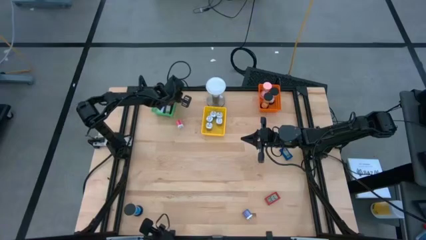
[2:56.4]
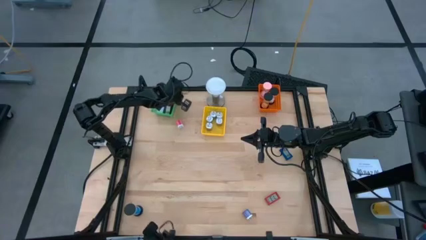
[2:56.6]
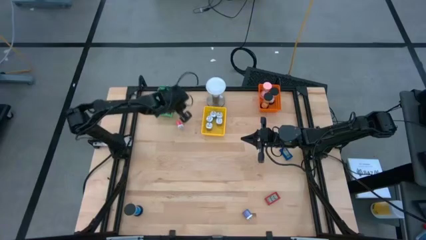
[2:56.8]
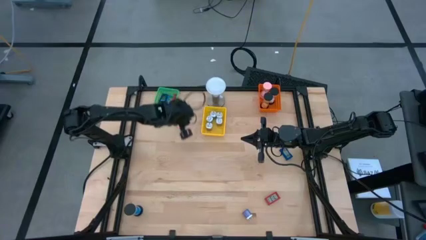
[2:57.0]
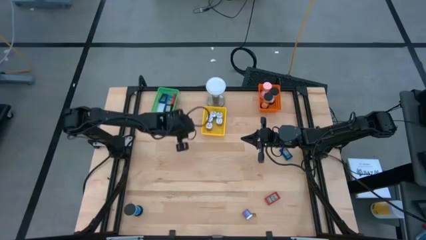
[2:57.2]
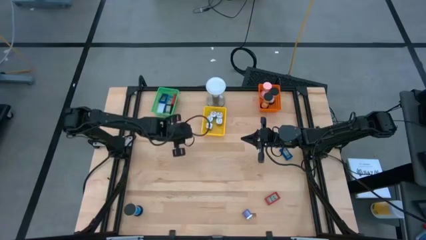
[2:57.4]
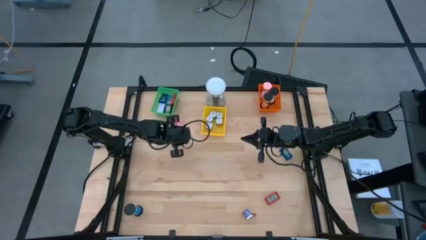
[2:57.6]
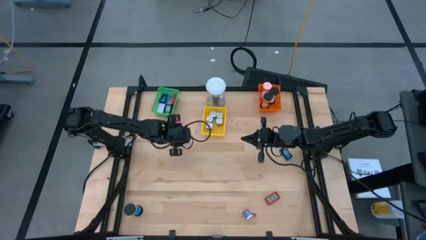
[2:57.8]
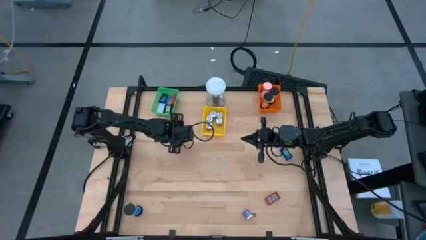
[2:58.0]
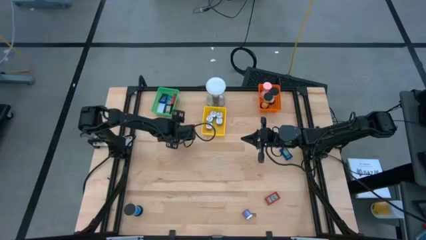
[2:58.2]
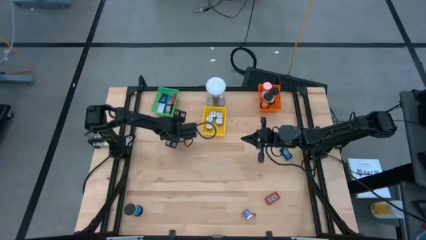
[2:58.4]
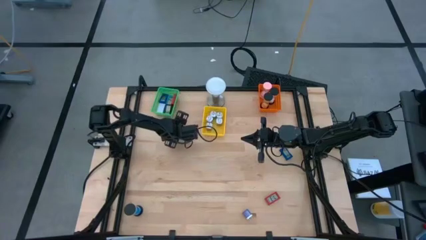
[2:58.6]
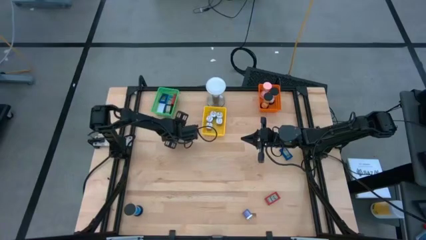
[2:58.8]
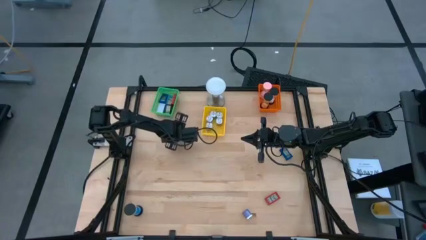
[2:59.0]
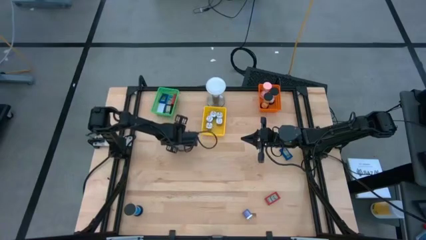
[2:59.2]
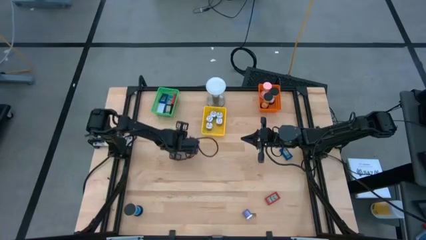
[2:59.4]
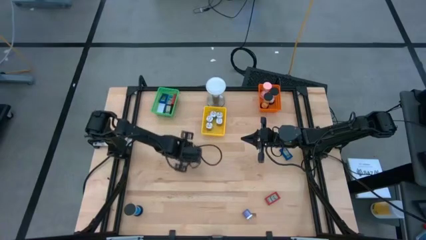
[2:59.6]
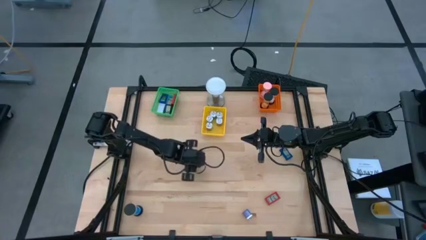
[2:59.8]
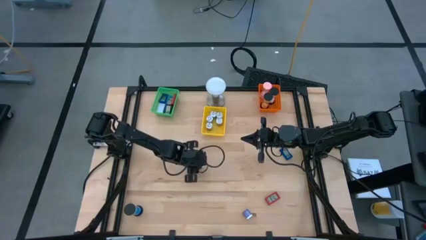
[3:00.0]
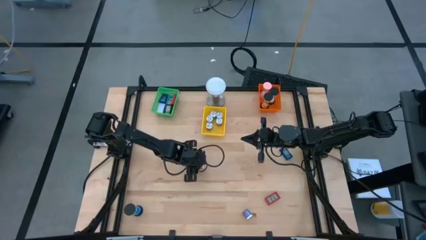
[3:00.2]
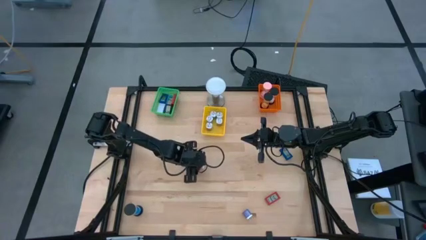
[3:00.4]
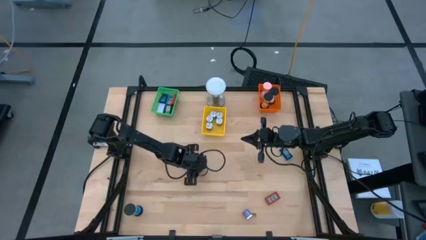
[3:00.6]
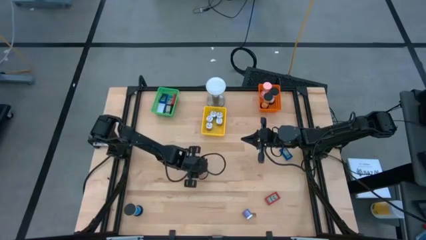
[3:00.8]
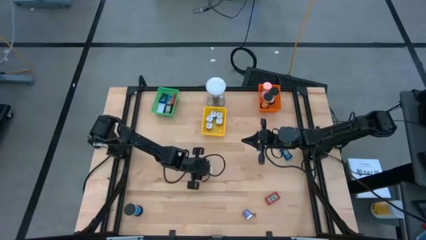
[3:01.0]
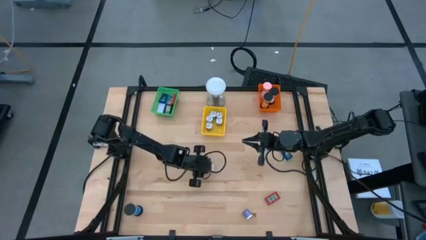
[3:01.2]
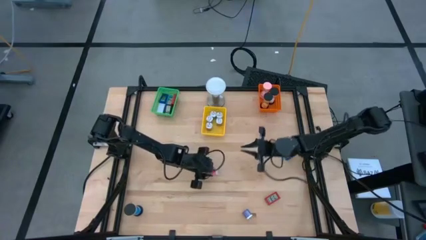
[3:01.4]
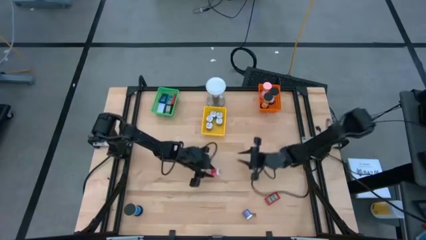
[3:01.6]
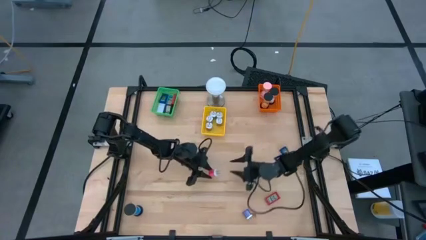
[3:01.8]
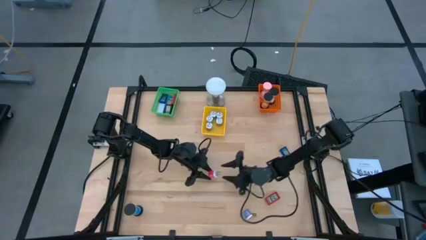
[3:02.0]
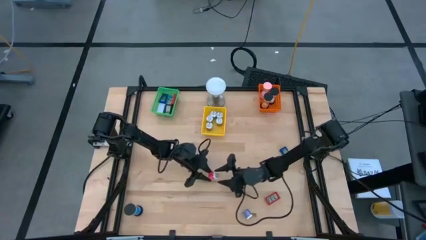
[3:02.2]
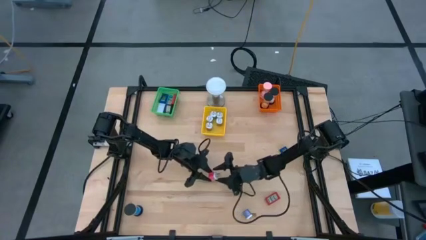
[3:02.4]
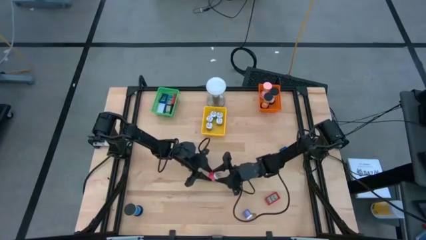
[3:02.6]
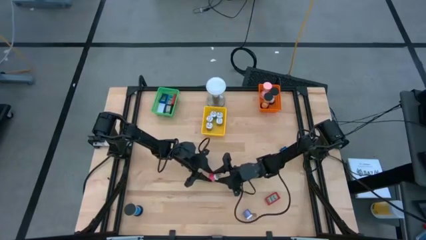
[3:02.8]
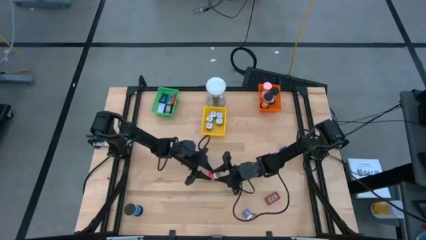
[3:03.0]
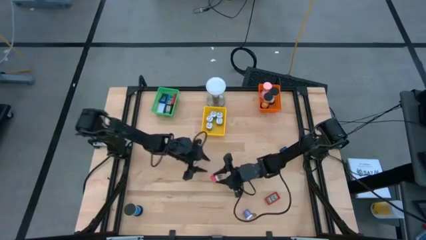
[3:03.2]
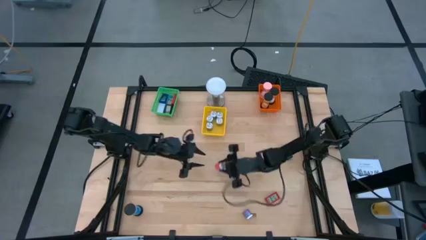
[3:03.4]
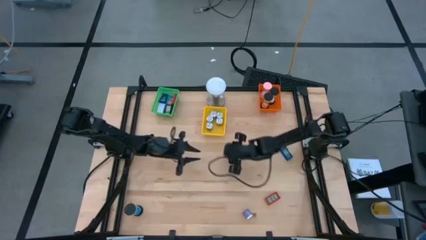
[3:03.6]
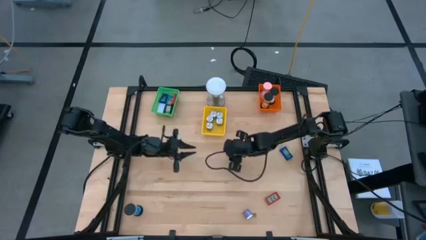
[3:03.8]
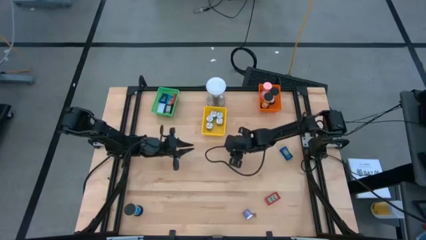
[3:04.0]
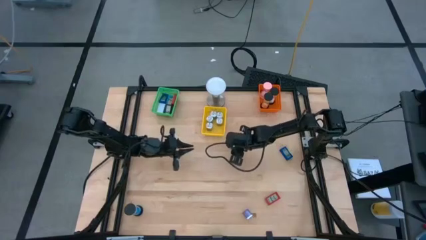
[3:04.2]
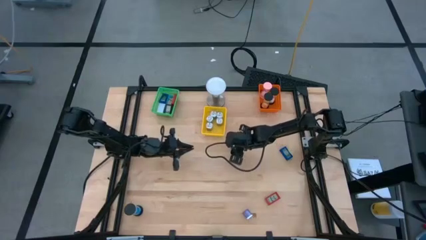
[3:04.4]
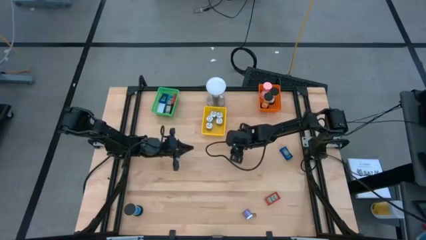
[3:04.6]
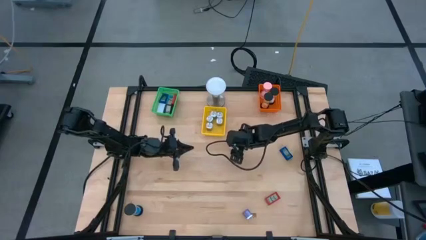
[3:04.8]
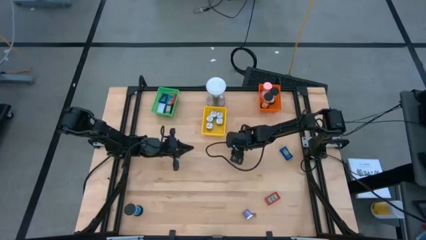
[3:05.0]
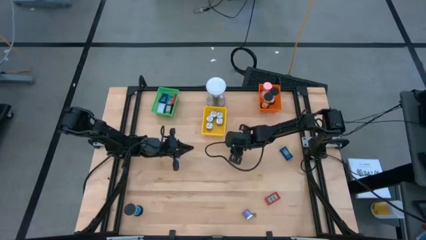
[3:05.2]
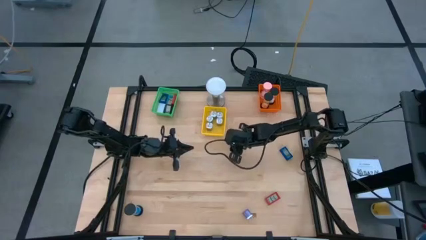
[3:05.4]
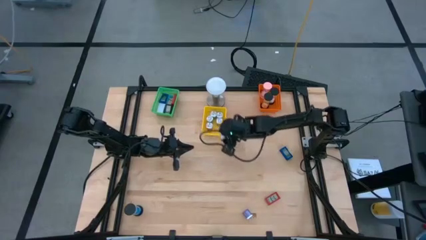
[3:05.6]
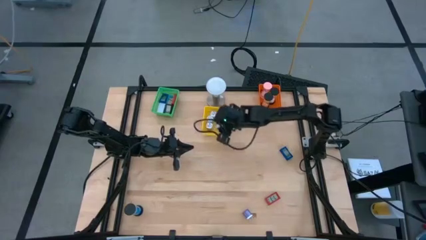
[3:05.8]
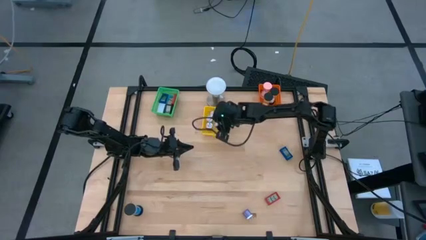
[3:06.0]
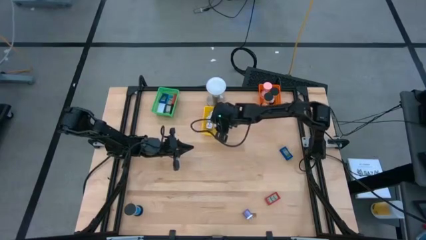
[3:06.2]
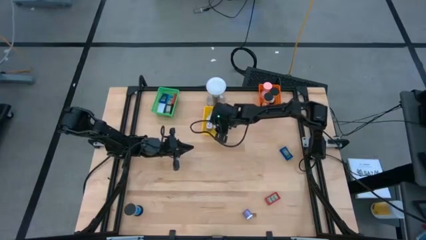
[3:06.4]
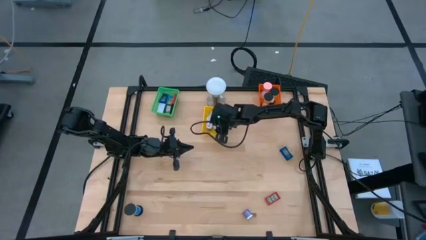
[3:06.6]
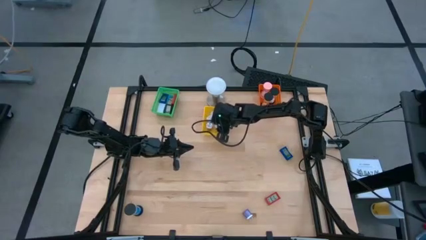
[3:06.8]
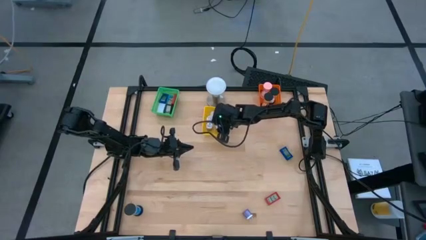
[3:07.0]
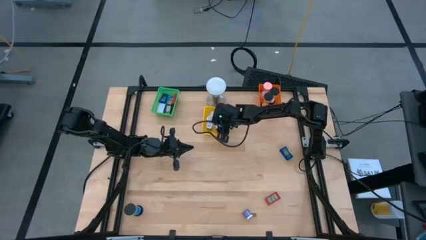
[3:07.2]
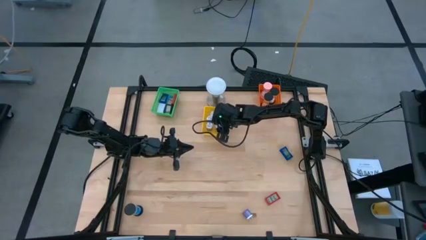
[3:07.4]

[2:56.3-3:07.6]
Task: Pick & Place Office items
Put the pink charger adapter into the yellow bin

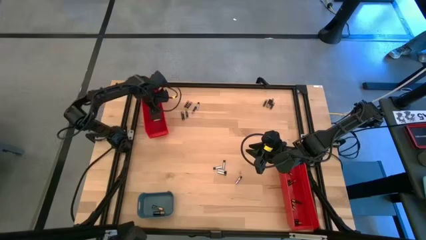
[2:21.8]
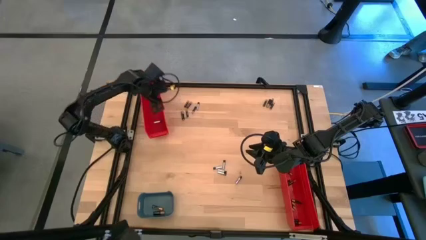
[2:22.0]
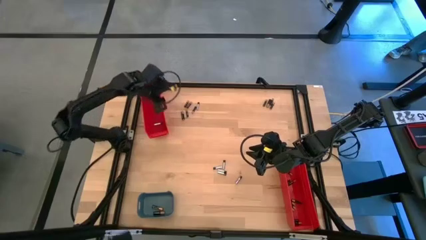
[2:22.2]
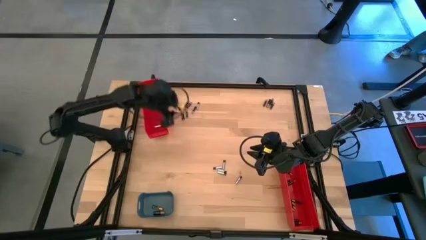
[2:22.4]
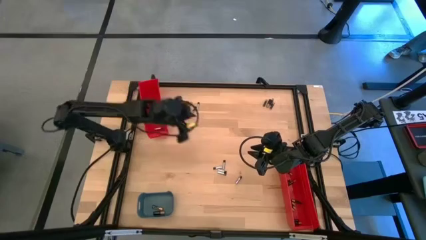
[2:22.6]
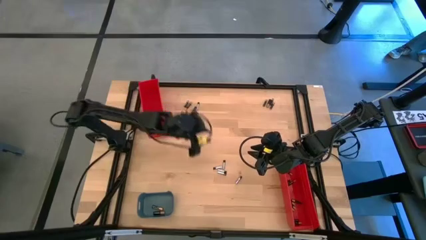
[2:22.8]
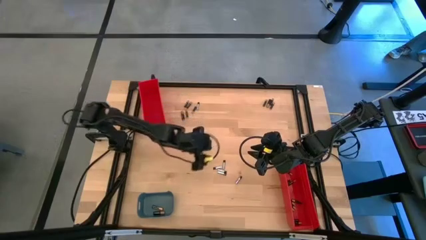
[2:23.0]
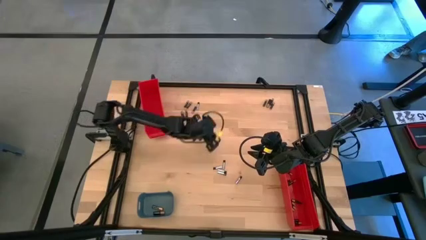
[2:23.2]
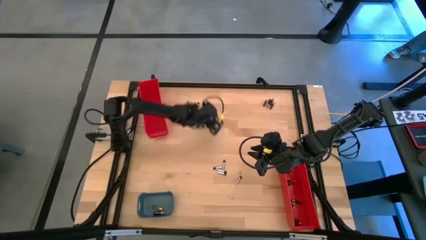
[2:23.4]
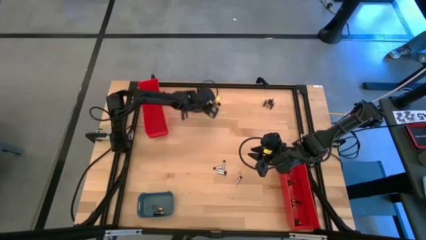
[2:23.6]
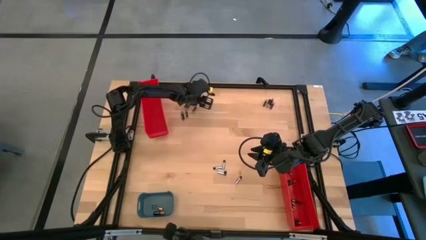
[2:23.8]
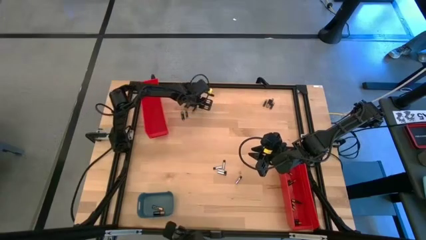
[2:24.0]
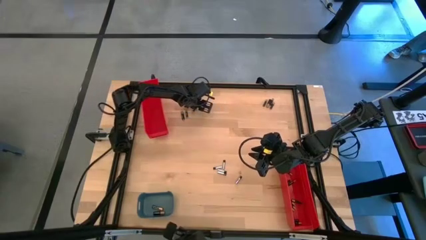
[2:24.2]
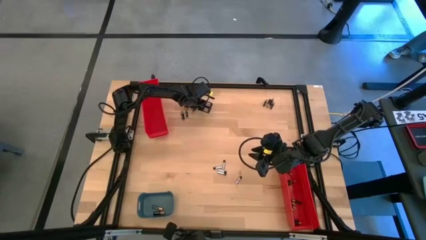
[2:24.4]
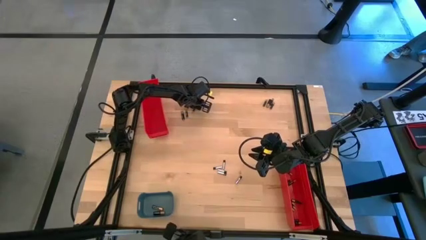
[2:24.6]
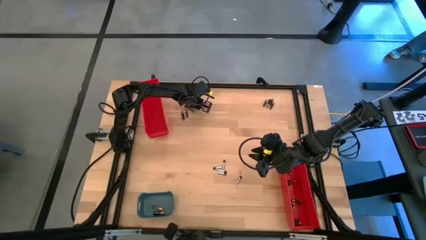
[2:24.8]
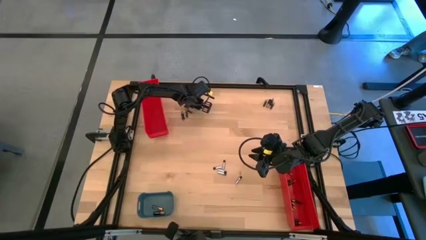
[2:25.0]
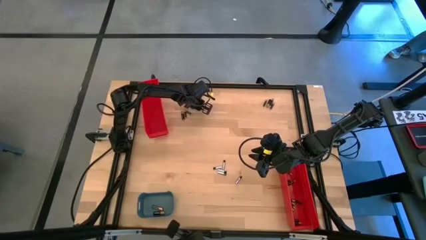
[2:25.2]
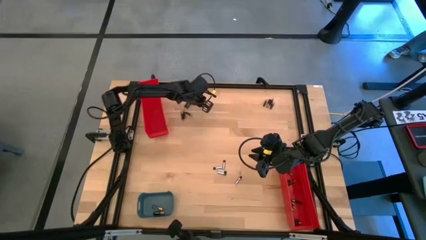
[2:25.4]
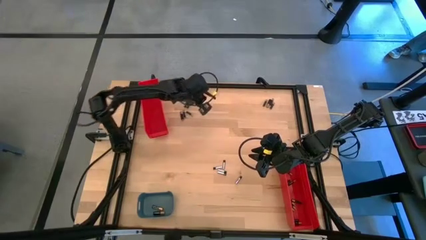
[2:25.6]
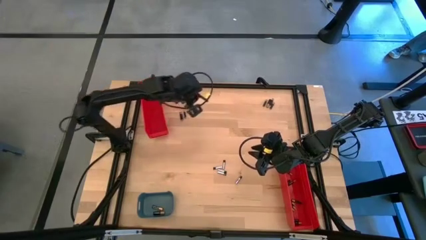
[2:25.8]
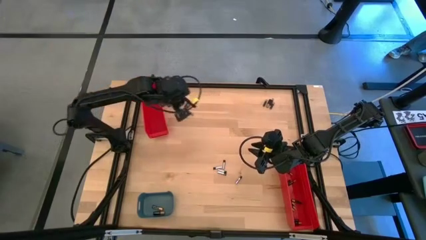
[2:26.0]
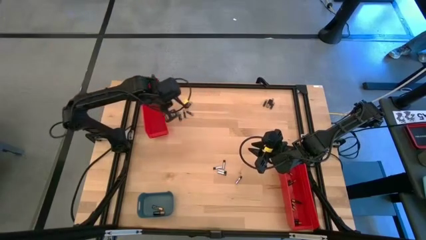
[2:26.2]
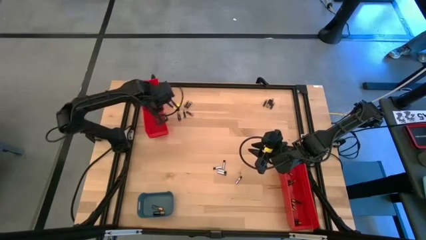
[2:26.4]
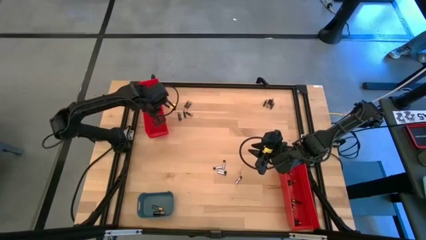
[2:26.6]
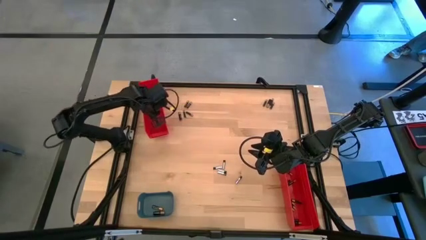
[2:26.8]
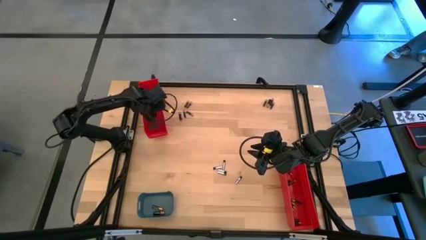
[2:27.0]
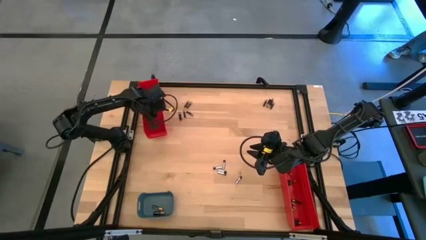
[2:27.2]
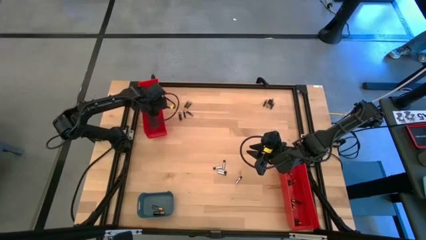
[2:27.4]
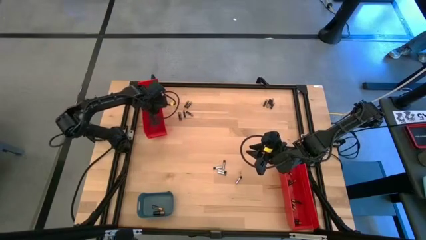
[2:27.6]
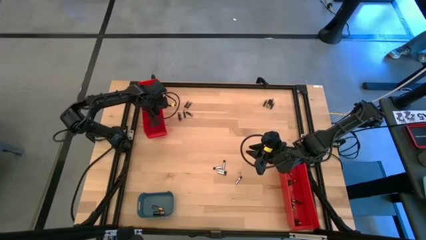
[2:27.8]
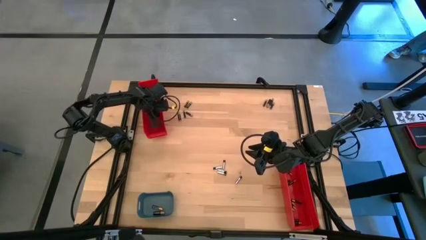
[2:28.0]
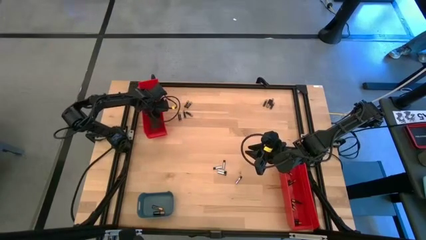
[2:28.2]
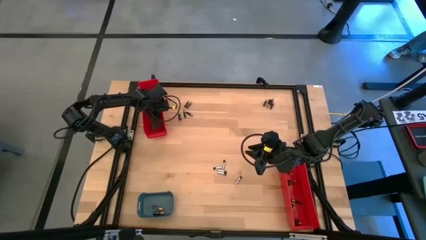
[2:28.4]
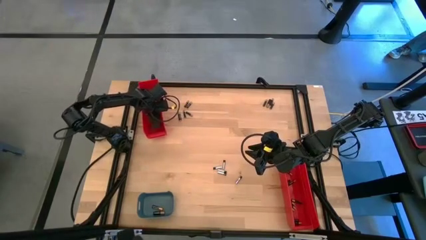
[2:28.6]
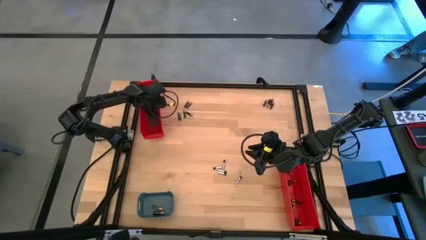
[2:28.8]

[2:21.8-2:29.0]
Task: Sort batteries
Put the silver battery into the top red bin
